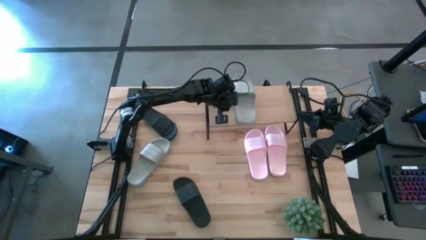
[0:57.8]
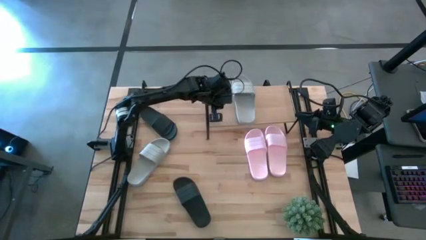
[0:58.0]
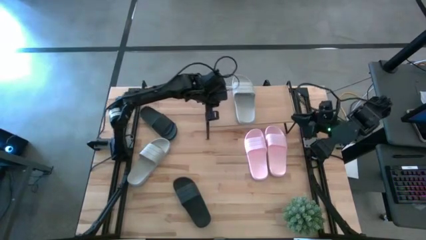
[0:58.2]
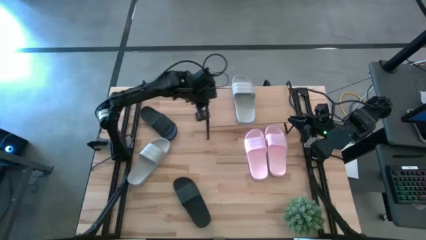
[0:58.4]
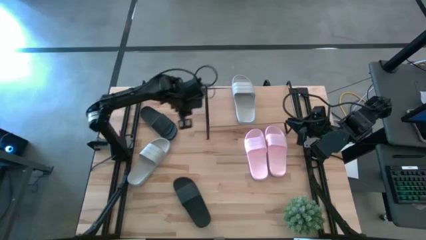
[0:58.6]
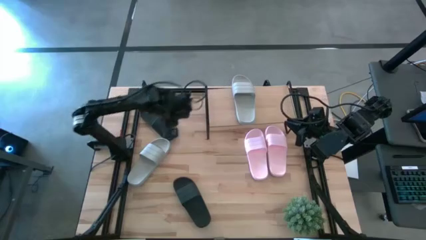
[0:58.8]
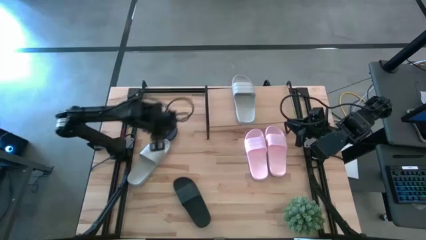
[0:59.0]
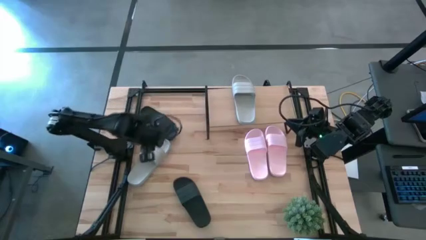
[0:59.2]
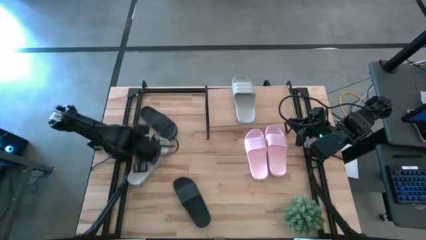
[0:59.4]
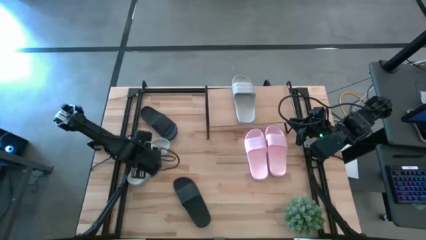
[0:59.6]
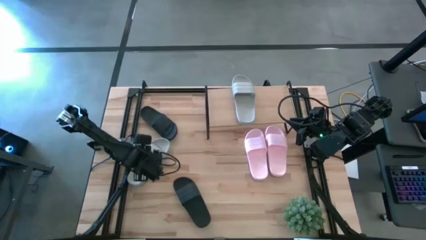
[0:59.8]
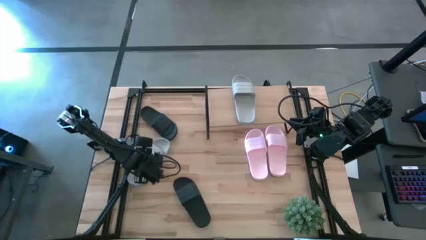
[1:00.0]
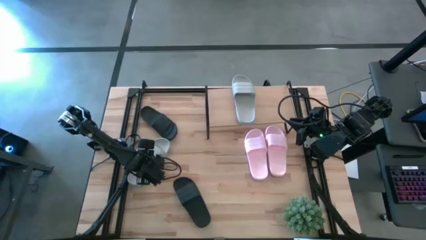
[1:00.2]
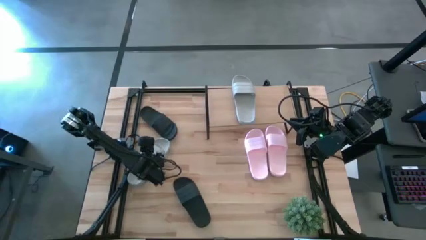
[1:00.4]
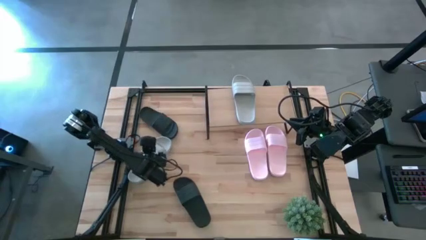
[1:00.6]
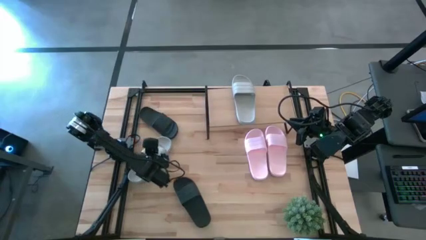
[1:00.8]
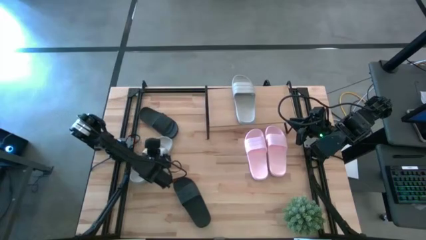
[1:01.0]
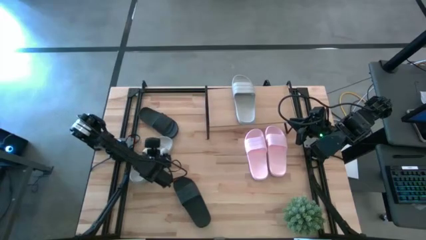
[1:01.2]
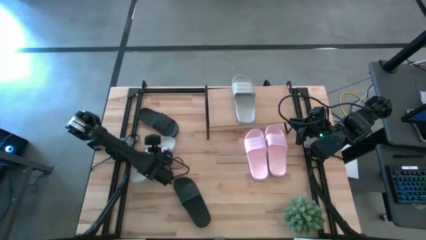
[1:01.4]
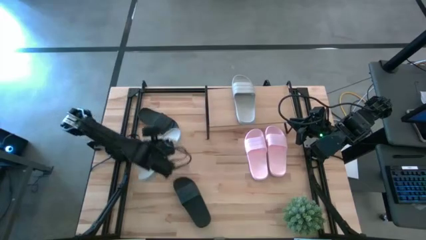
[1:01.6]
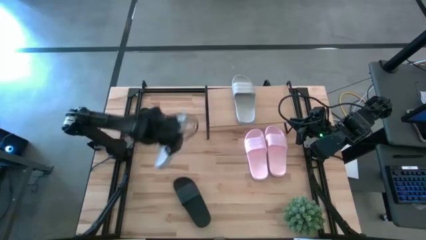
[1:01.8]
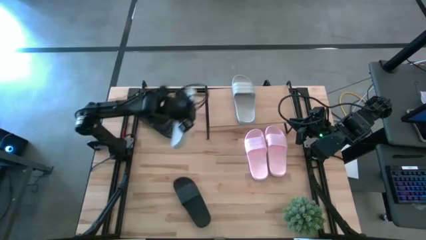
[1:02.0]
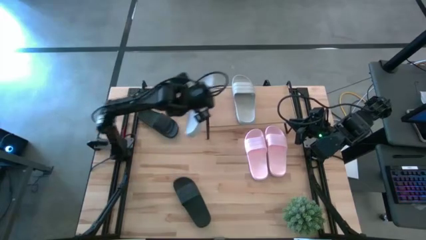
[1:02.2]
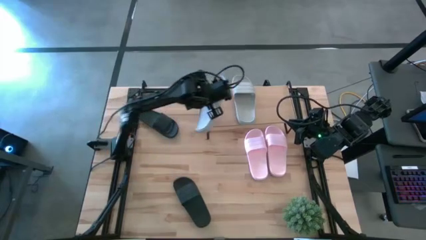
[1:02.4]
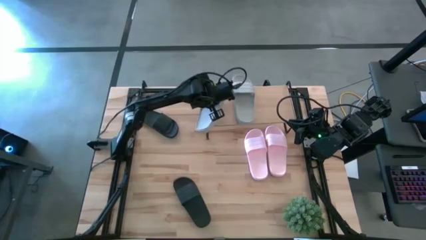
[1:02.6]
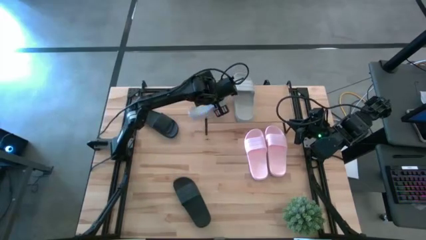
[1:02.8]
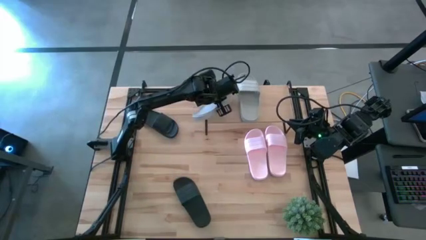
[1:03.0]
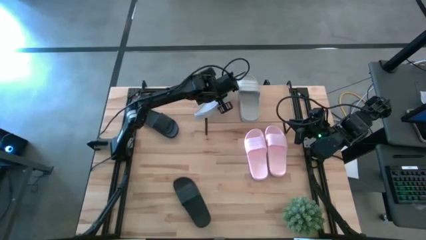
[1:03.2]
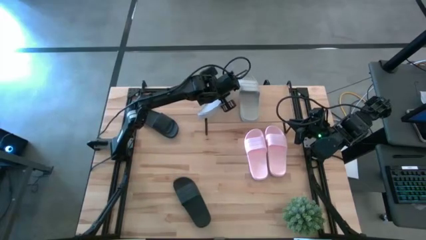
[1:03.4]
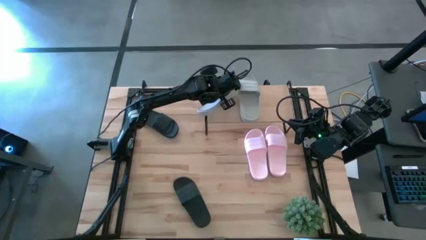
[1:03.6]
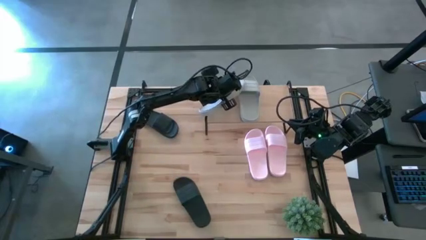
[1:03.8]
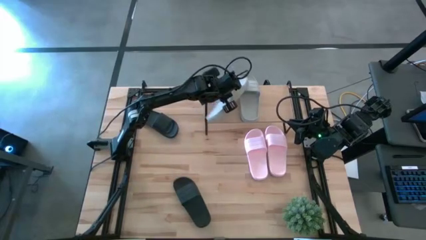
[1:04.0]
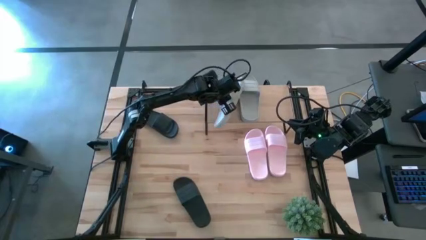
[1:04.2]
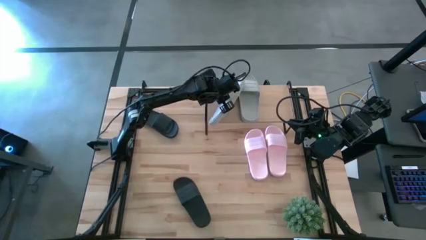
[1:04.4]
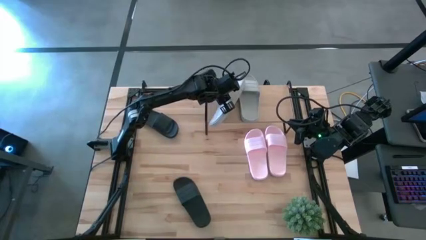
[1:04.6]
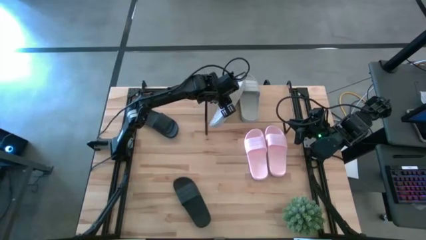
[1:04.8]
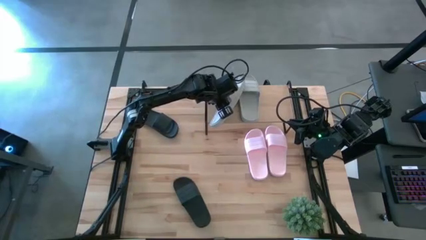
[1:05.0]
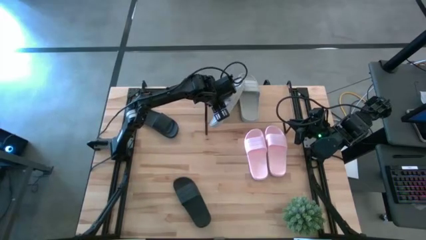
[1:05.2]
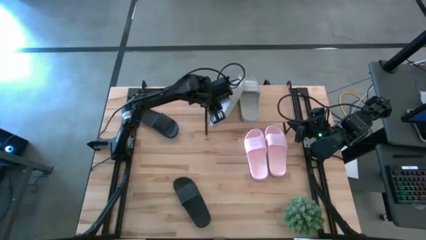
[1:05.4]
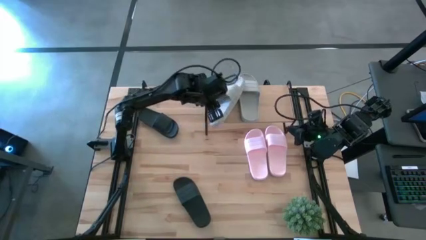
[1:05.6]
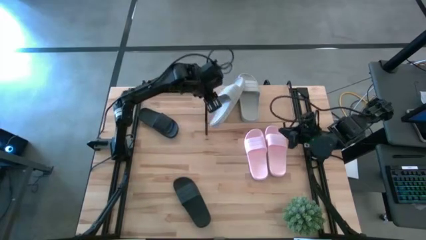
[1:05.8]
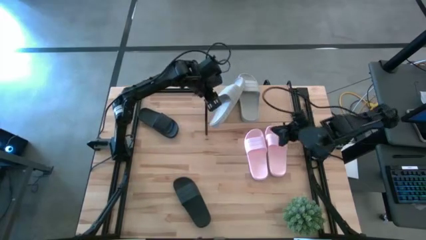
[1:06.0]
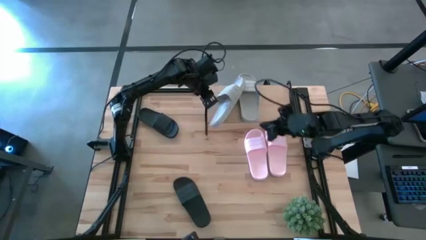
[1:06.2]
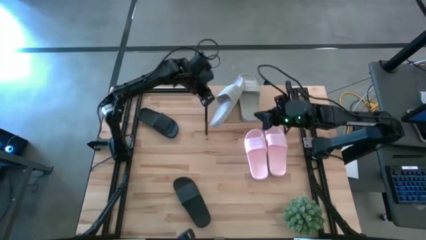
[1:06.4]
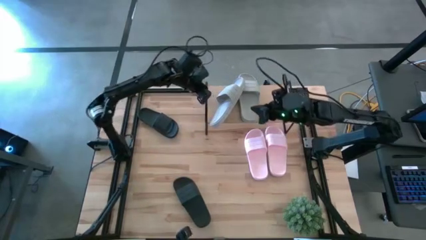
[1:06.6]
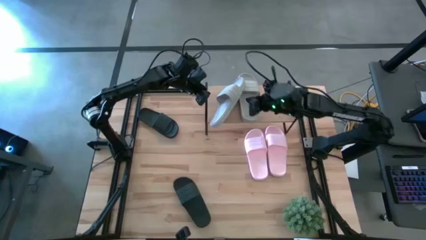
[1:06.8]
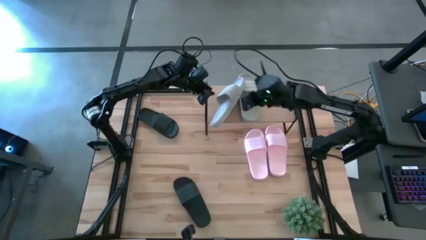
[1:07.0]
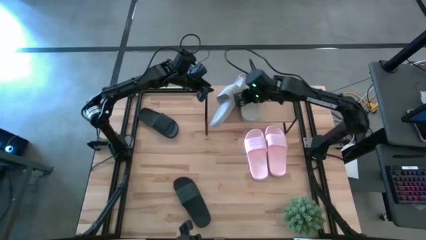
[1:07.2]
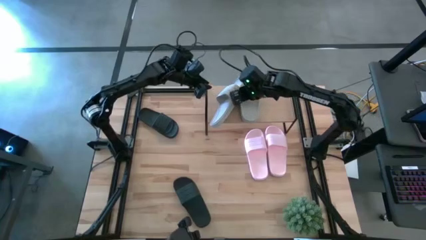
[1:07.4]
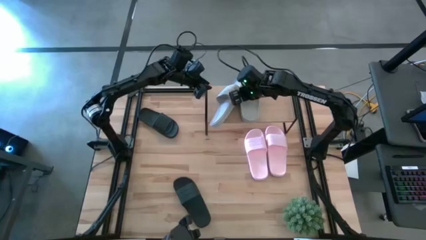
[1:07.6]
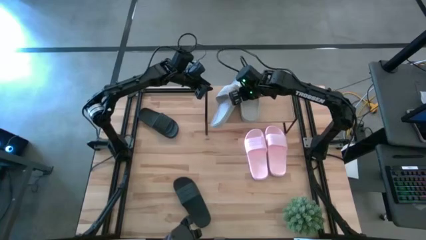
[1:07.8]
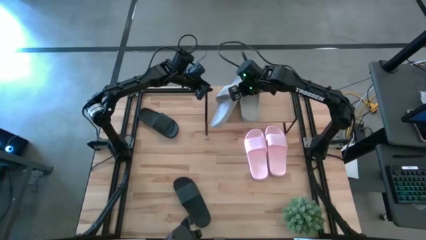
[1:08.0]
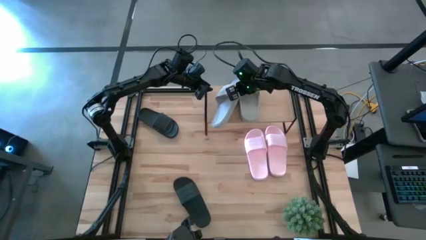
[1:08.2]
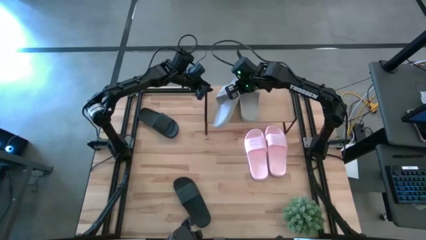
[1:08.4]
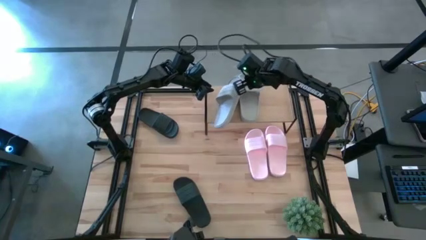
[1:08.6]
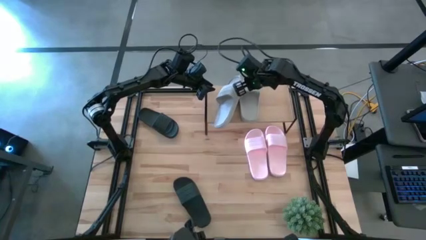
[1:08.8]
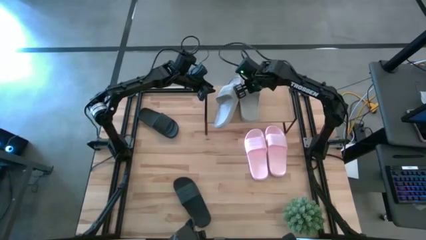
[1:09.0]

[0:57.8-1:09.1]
Task: Pick and place slides into the shelf
Put the gray slide on the shelf
